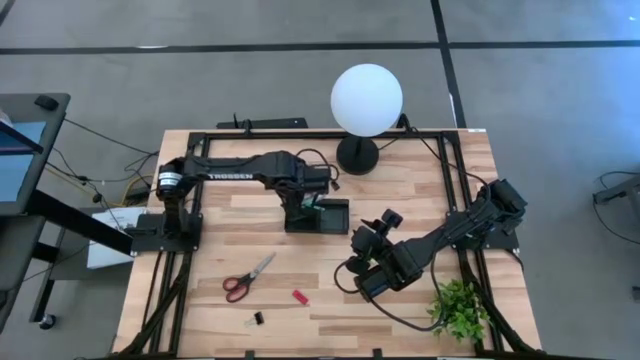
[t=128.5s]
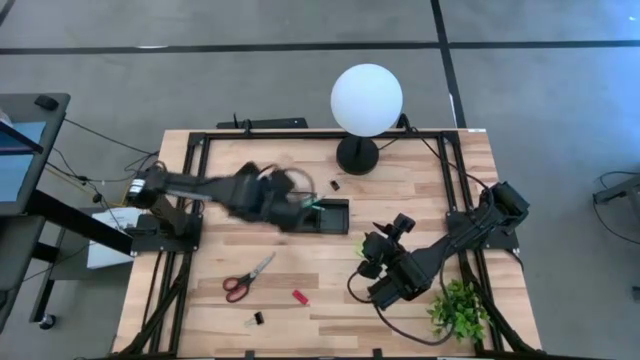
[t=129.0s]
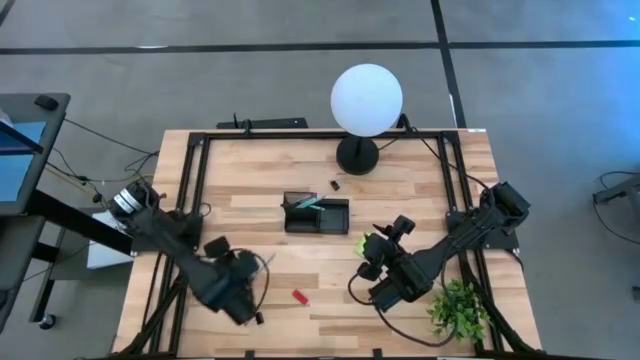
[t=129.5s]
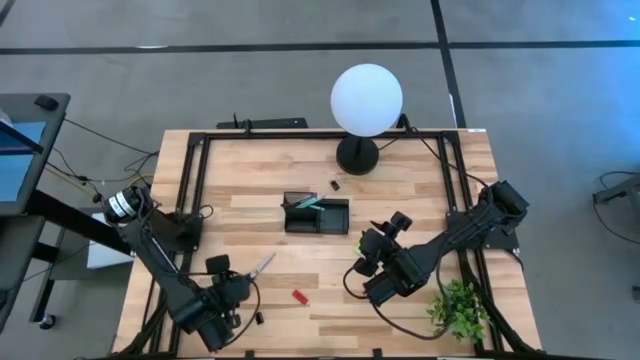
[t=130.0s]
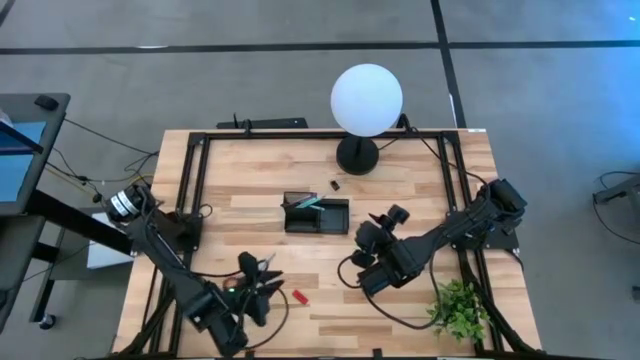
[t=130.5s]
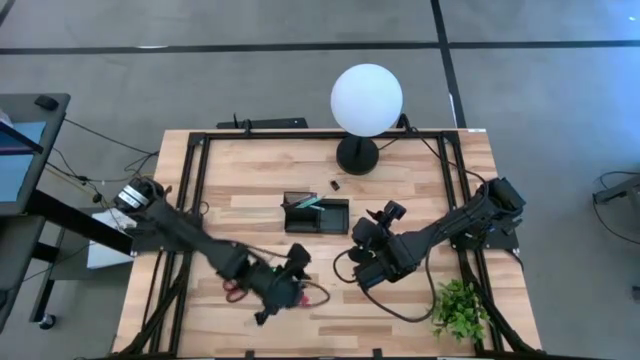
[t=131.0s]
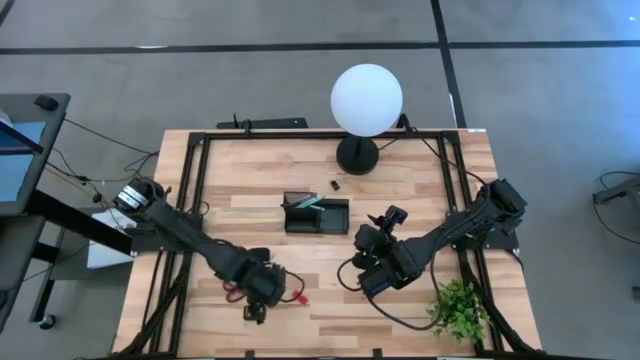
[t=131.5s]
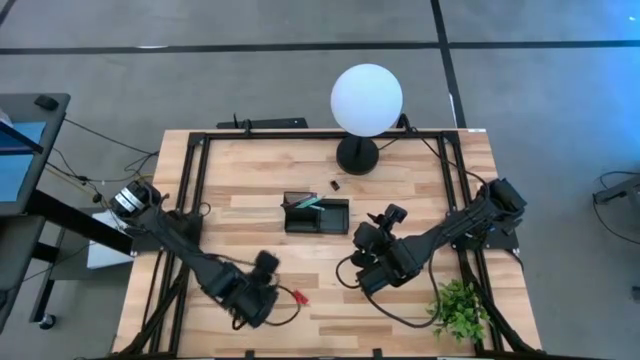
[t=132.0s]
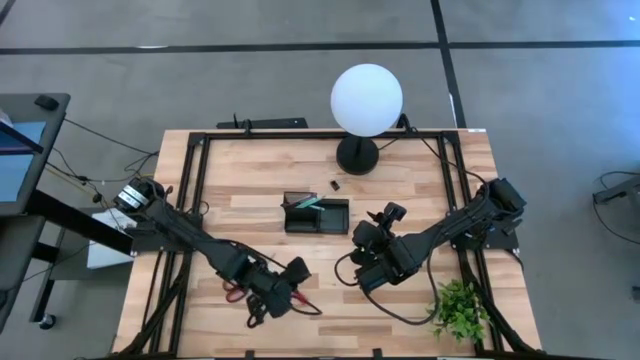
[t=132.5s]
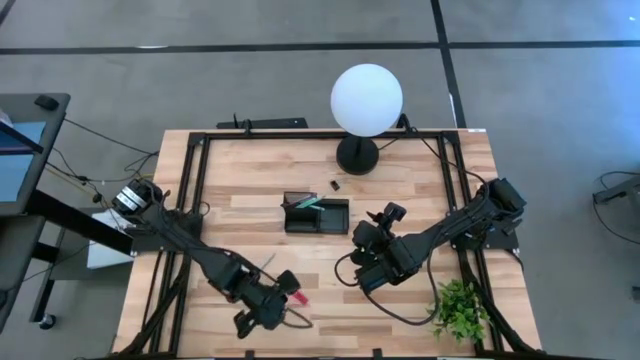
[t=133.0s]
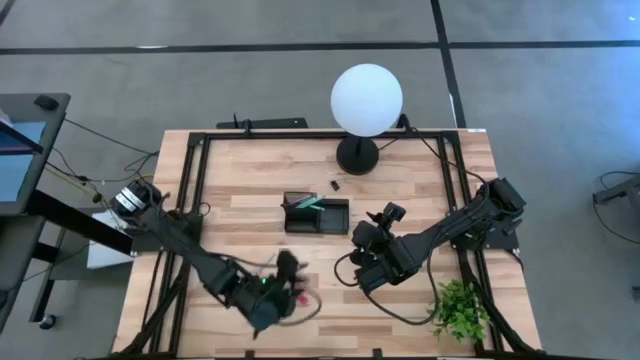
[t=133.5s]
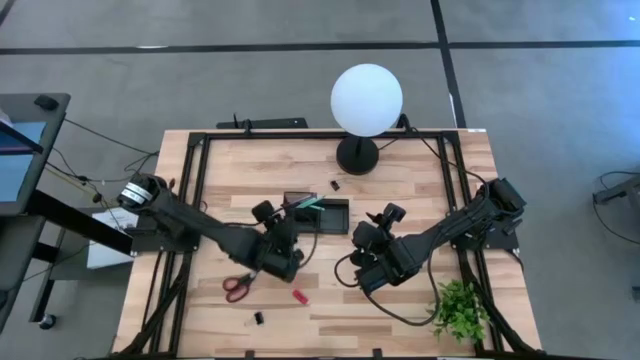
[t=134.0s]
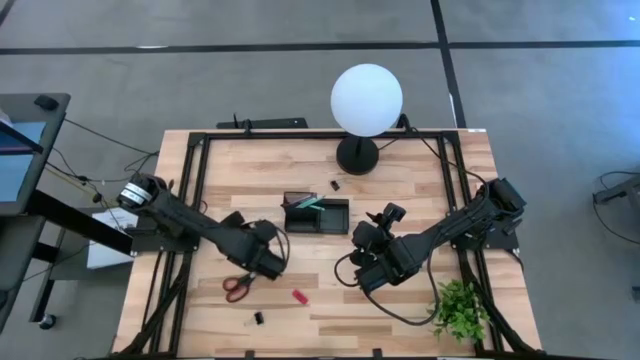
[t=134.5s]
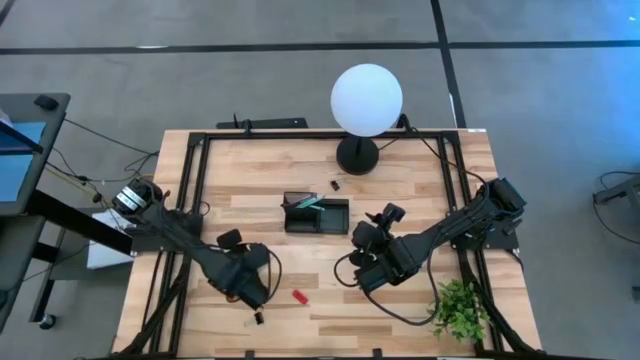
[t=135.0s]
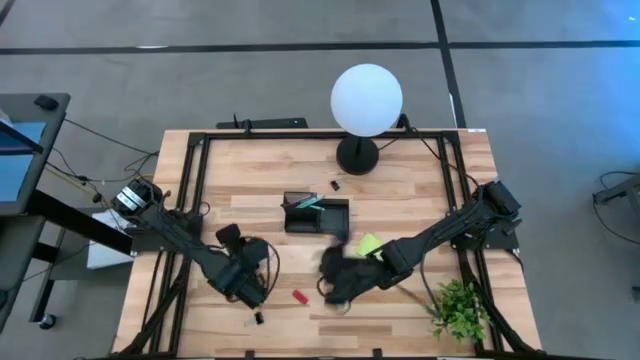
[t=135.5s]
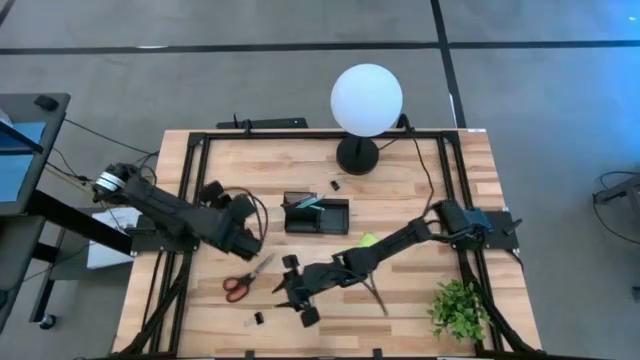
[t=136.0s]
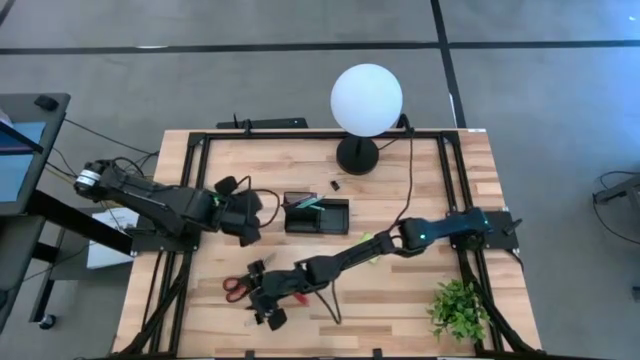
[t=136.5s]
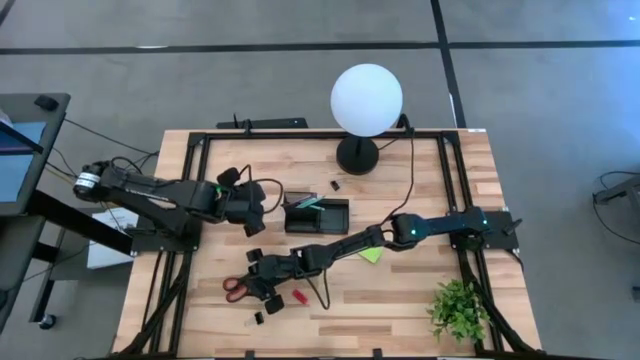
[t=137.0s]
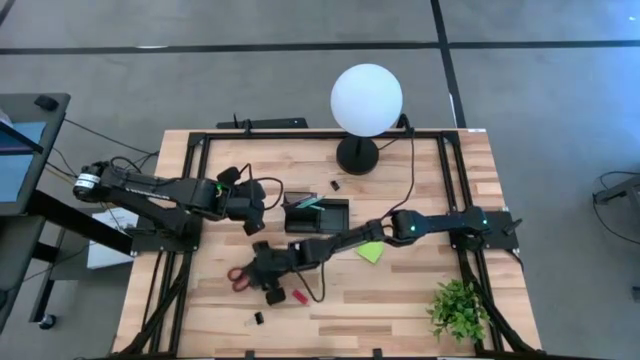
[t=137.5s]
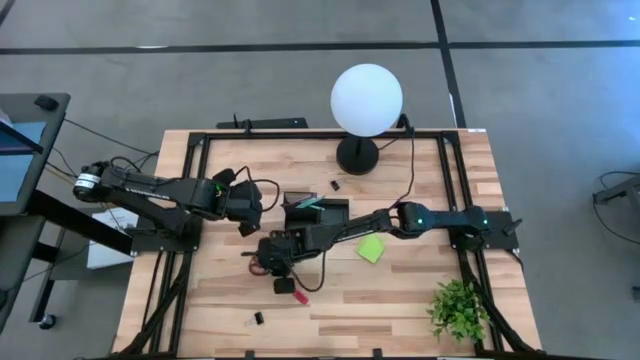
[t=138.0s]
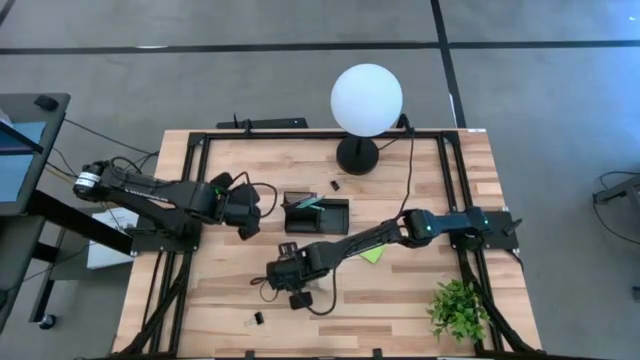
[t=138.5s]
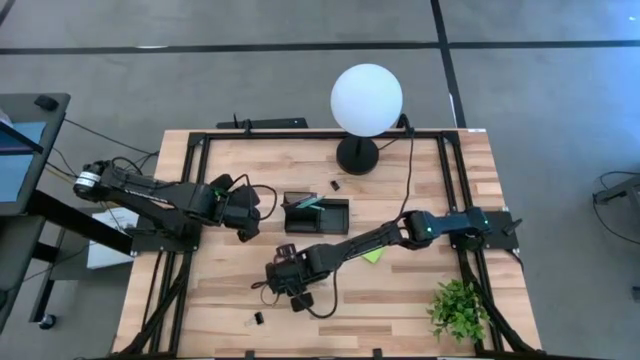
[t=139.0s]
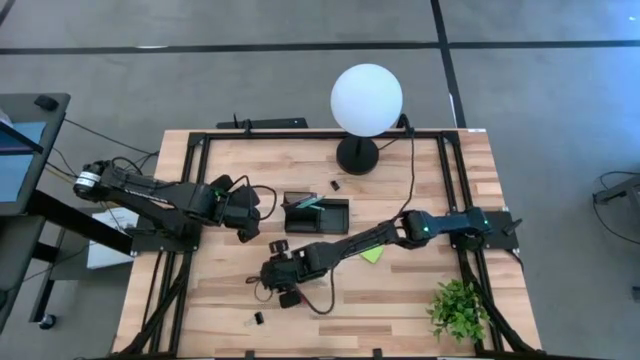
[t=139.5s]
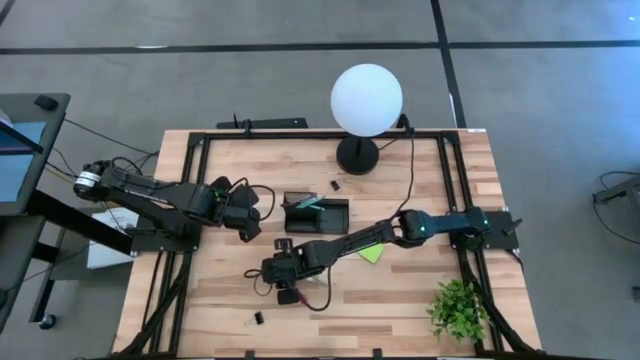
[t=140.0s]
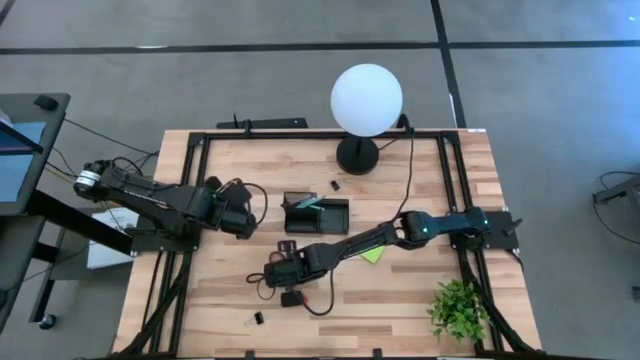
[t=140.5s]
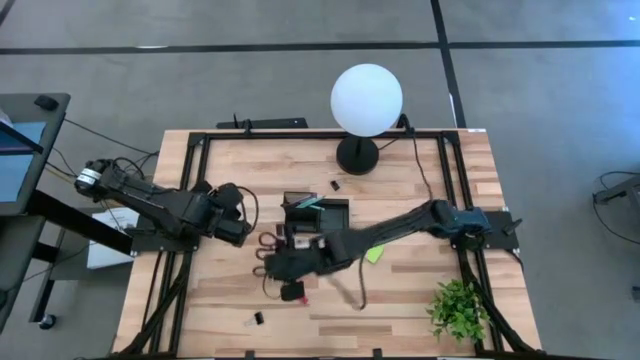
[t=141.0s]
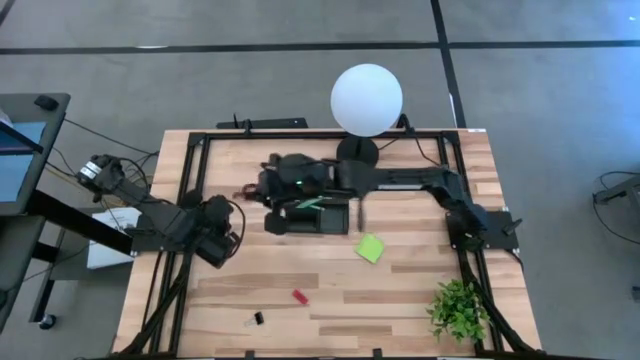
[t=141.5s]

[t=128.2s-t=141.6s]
Task: Pick and place office supplies into organizer
Put the black scissors into the black desk organizer

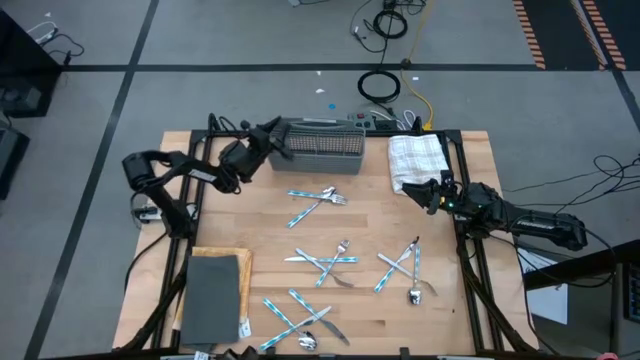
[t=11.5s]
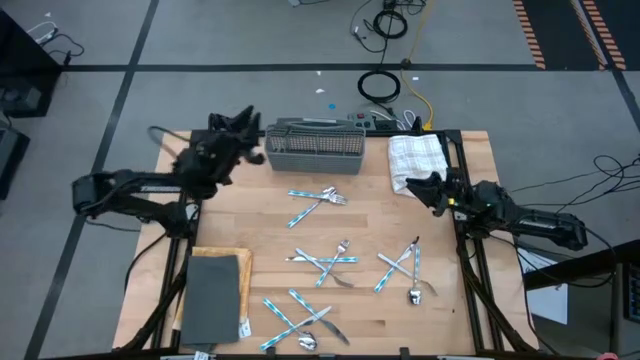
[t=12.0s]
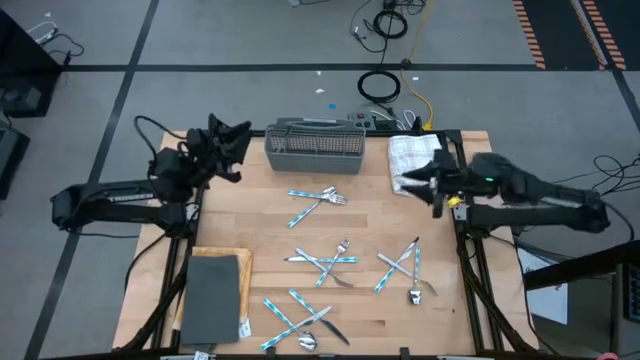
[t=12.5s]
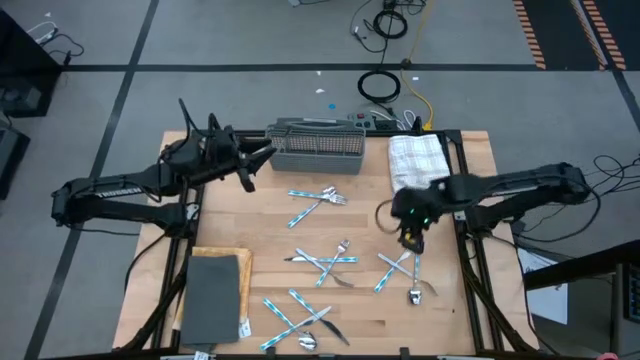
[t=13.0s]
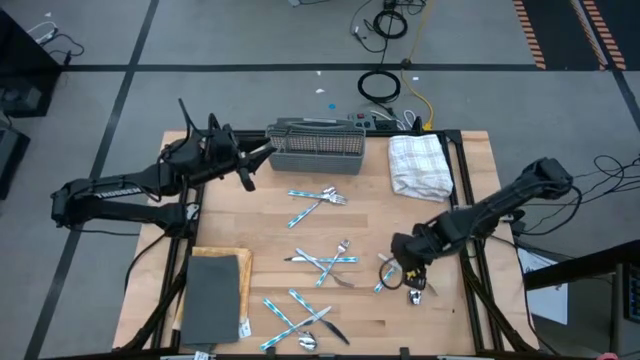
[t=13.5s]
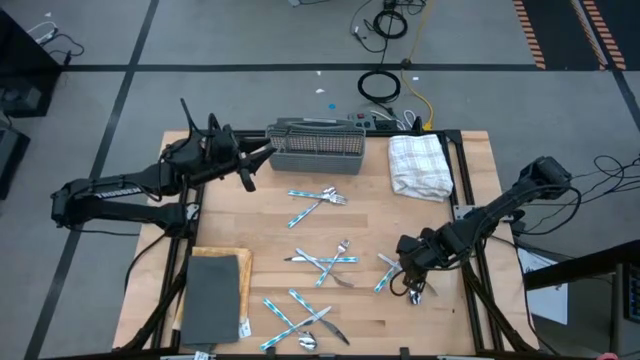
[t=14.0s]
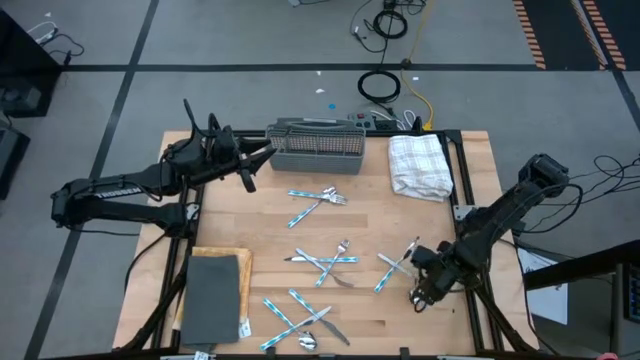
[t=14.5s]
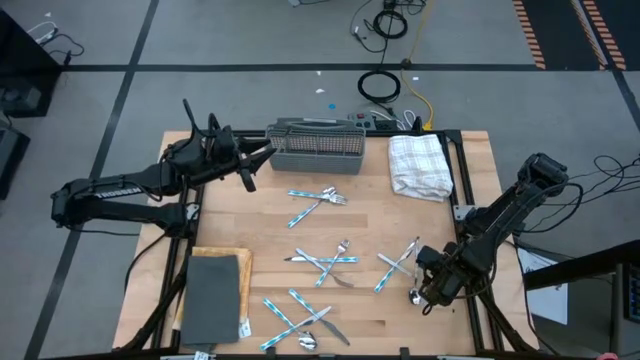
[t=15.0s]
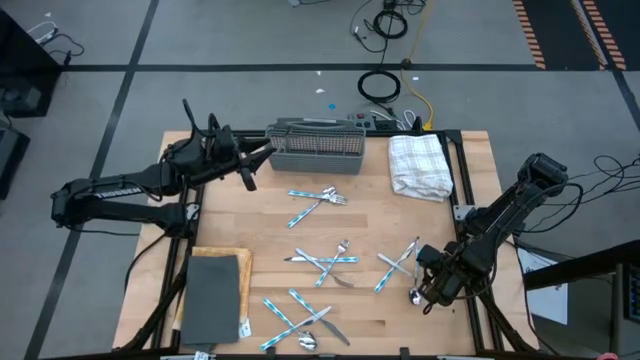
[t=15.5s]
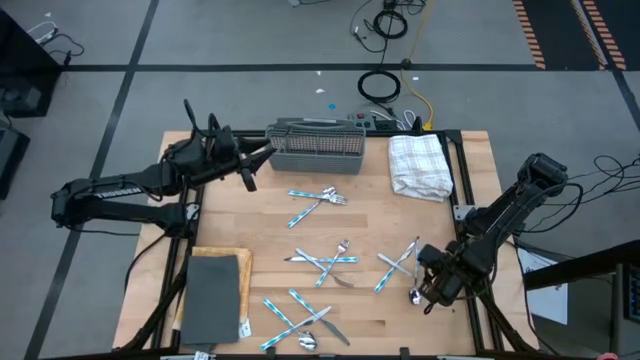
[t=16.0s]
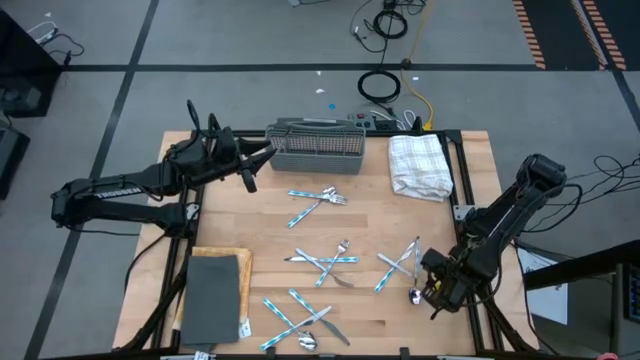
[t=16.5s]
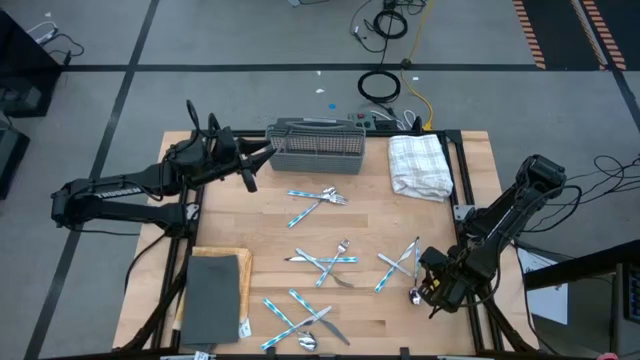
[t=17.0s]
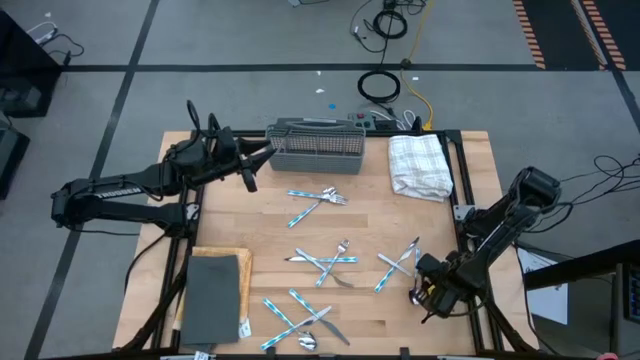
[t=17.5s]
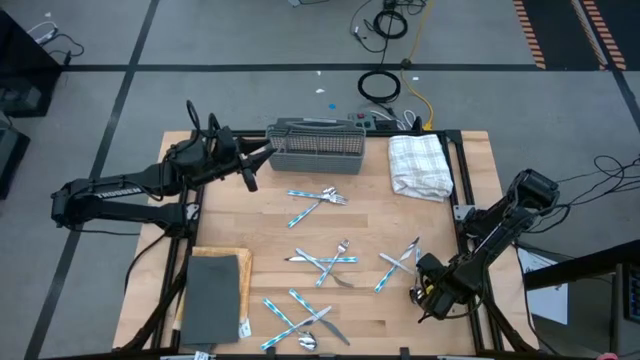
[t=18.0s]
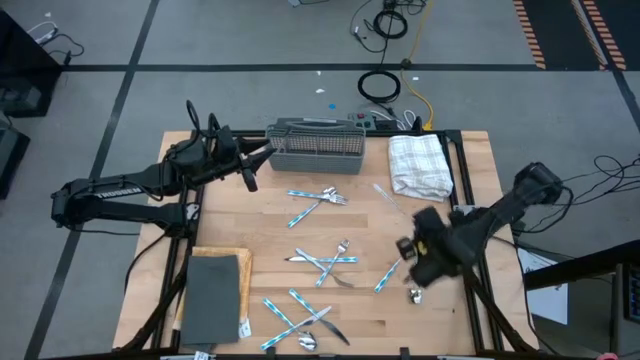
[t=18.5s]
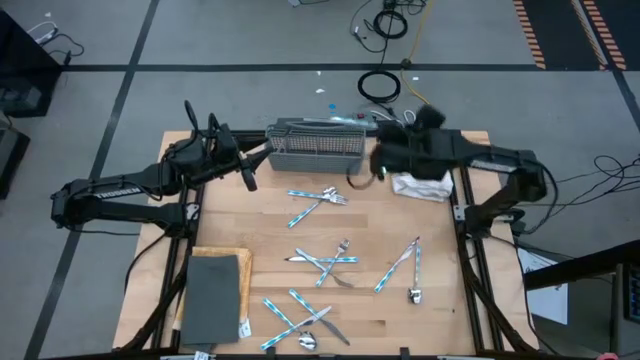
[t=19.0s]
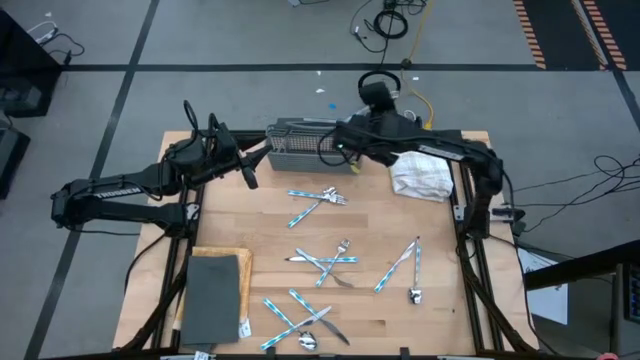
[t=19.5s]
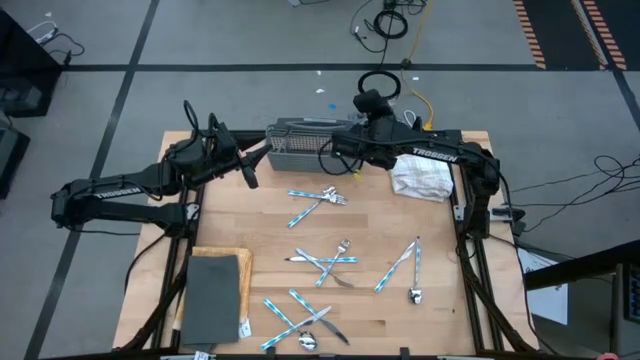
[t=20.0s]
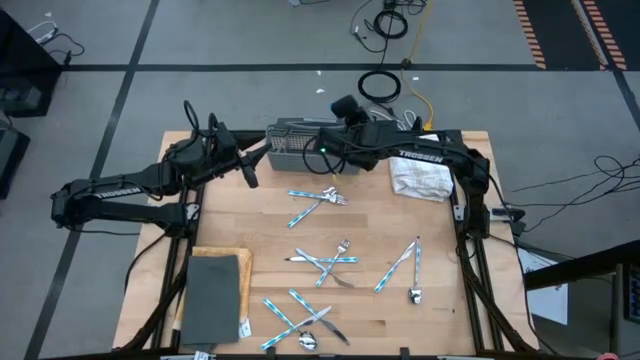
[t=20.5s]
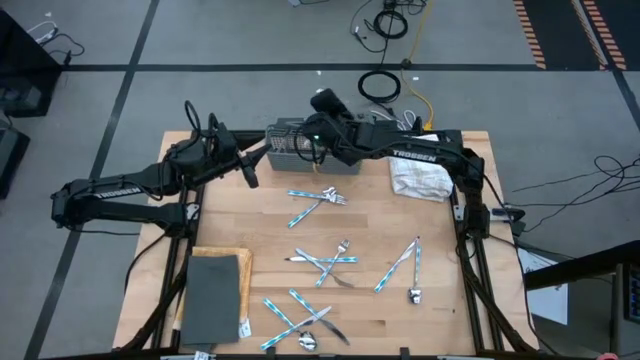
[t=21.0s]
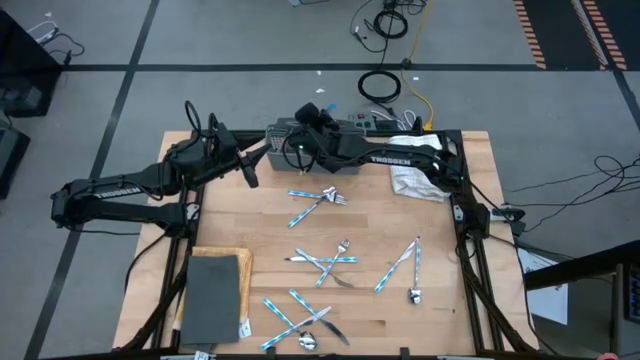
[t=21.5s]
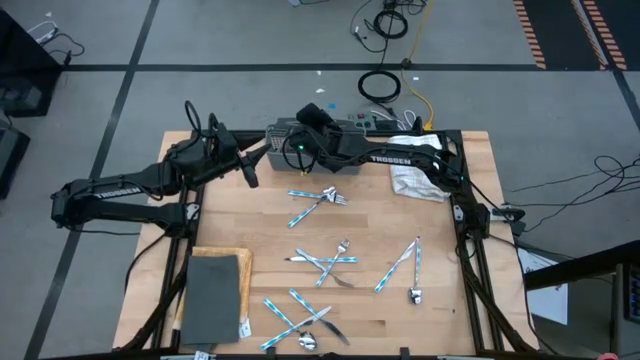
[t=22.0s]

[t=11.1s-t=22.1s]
Task: Sort silverware
Put the blue fork into the silverware basket
